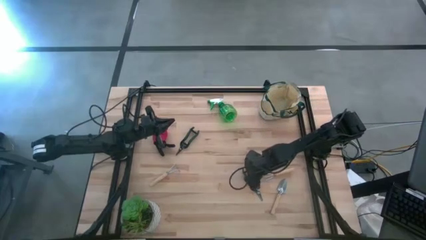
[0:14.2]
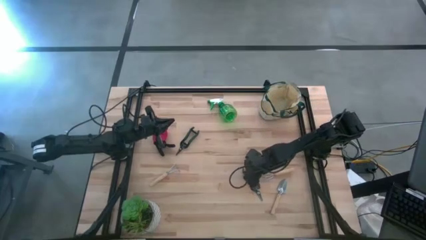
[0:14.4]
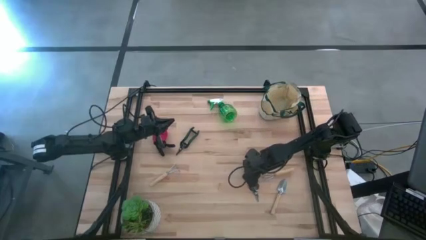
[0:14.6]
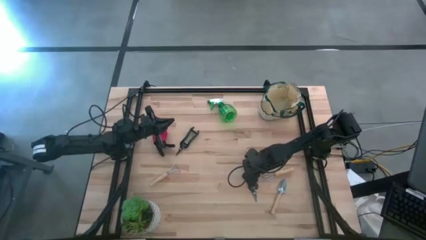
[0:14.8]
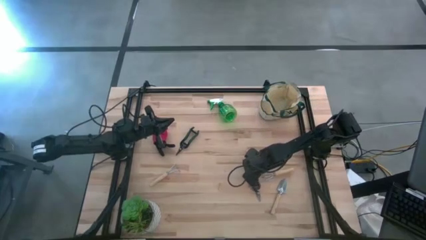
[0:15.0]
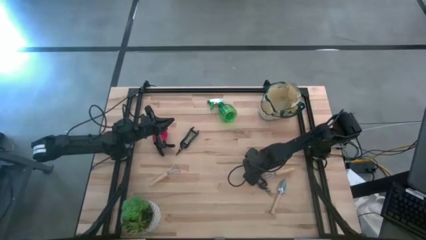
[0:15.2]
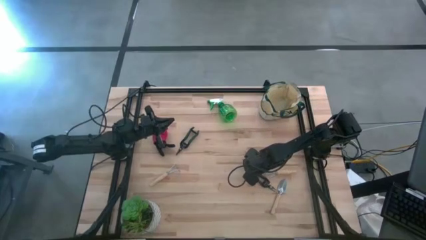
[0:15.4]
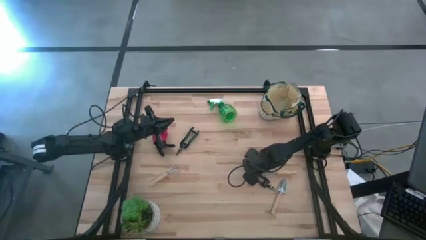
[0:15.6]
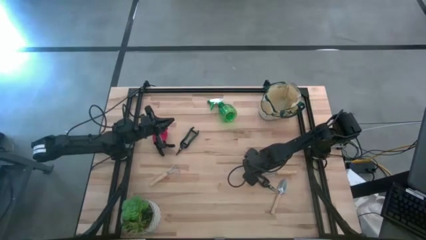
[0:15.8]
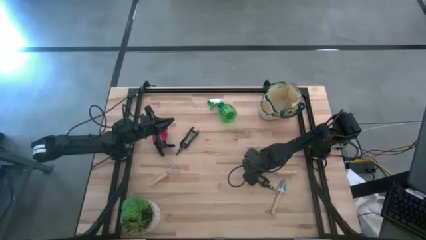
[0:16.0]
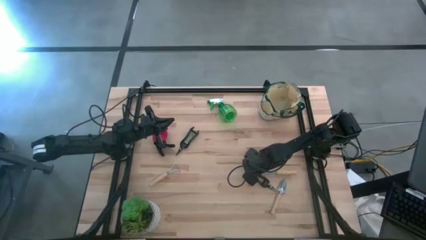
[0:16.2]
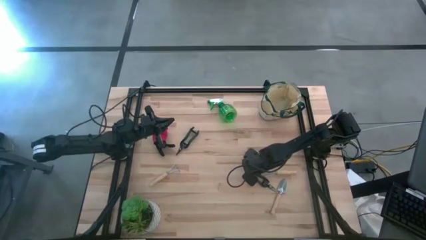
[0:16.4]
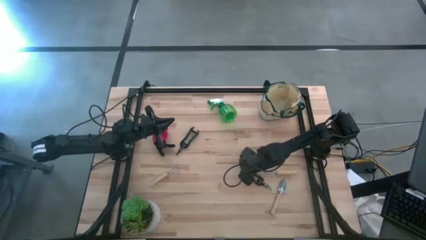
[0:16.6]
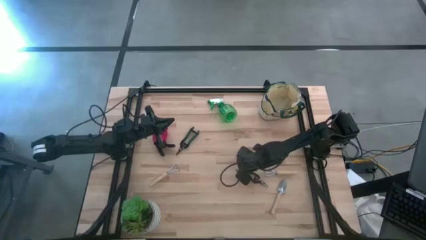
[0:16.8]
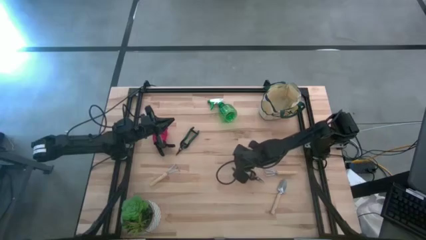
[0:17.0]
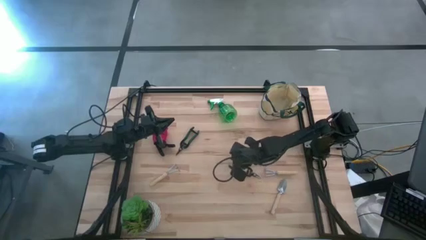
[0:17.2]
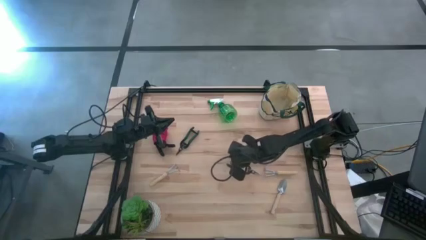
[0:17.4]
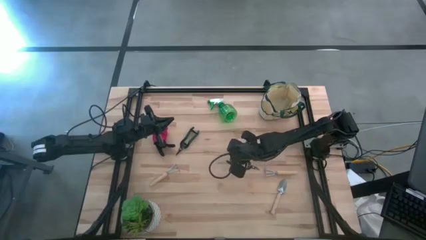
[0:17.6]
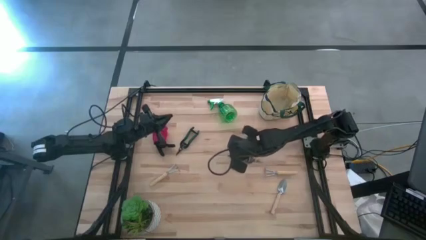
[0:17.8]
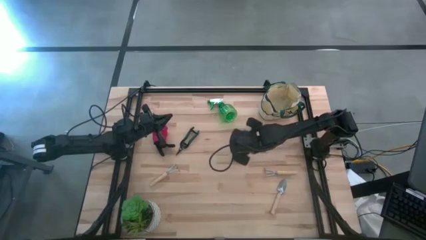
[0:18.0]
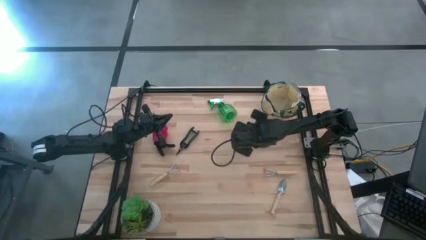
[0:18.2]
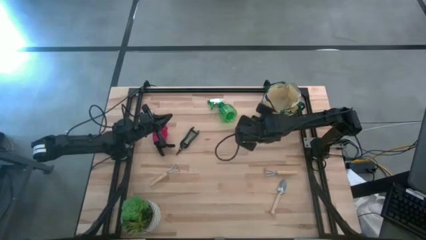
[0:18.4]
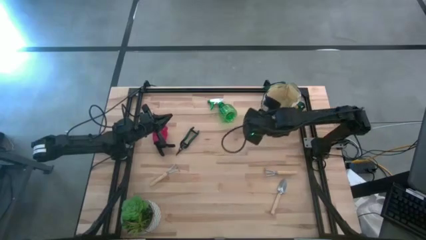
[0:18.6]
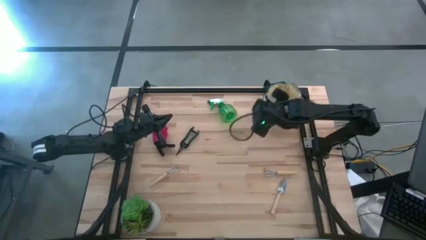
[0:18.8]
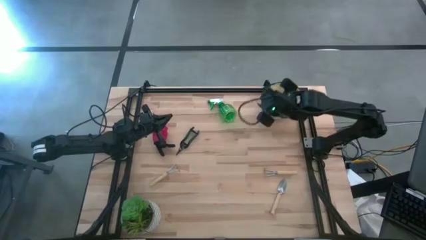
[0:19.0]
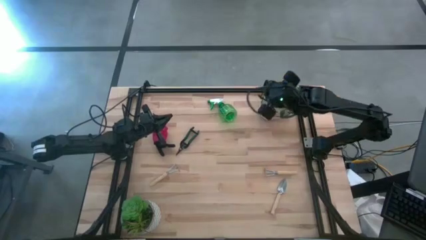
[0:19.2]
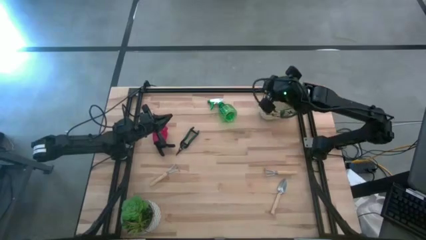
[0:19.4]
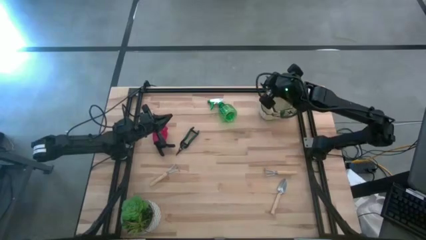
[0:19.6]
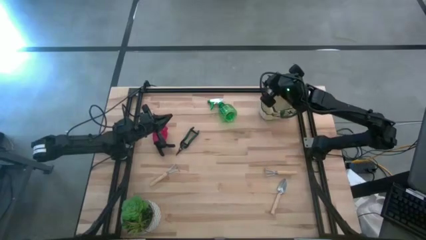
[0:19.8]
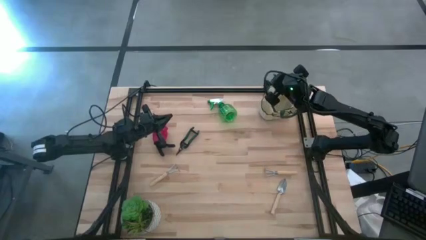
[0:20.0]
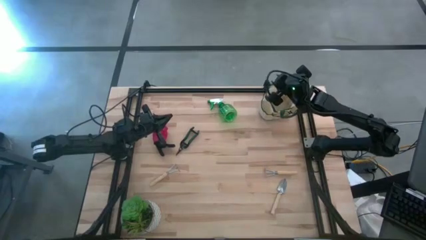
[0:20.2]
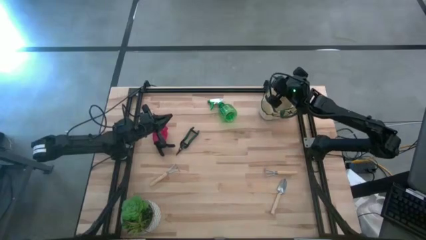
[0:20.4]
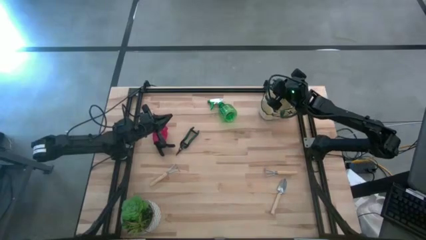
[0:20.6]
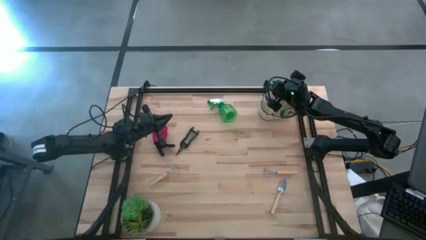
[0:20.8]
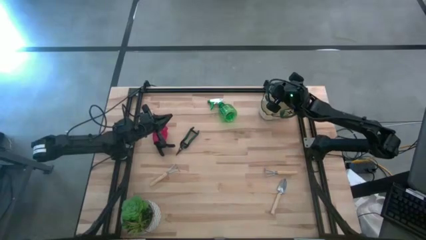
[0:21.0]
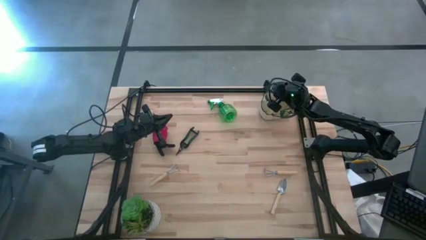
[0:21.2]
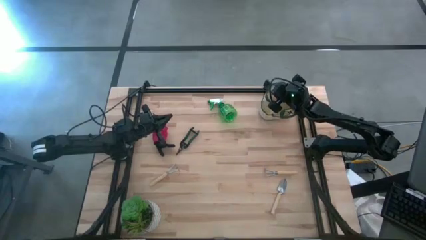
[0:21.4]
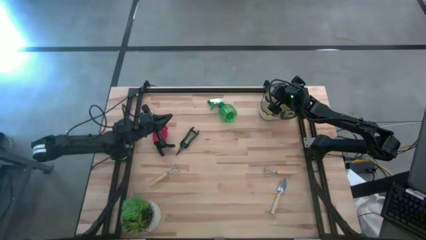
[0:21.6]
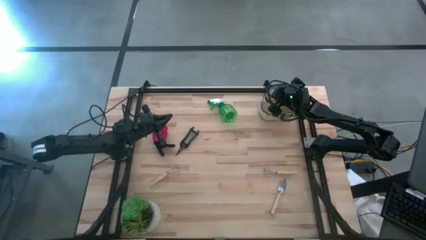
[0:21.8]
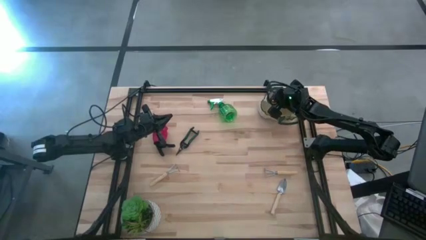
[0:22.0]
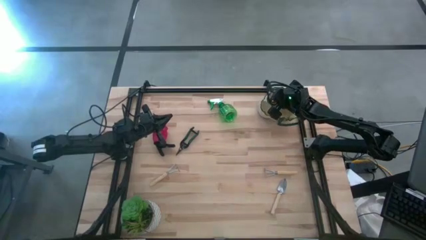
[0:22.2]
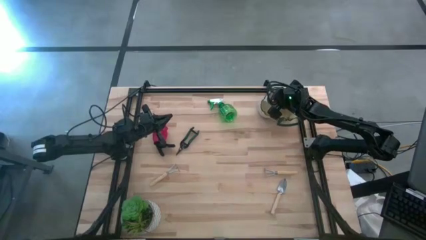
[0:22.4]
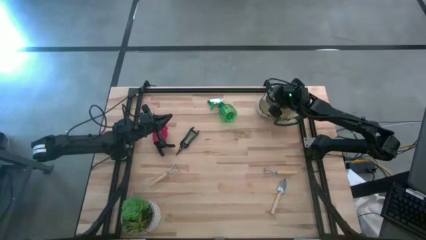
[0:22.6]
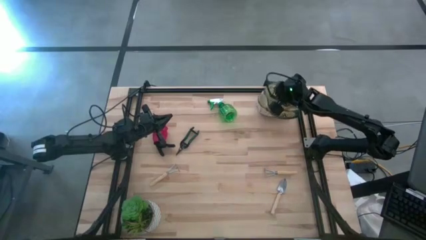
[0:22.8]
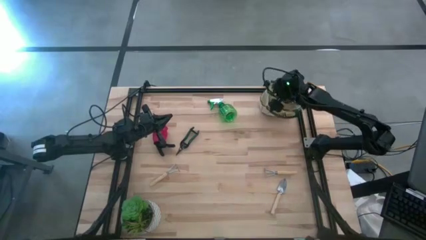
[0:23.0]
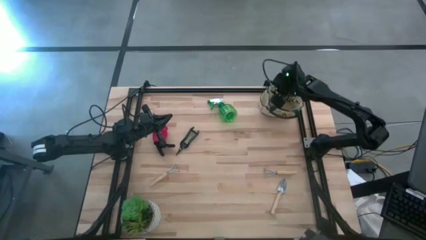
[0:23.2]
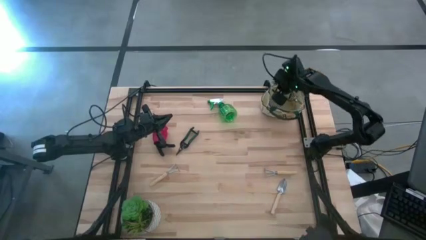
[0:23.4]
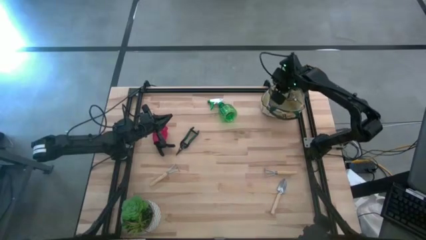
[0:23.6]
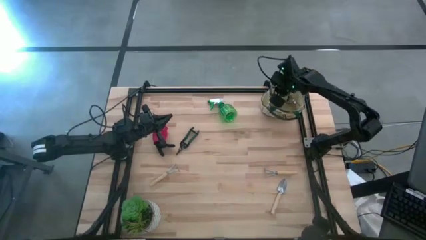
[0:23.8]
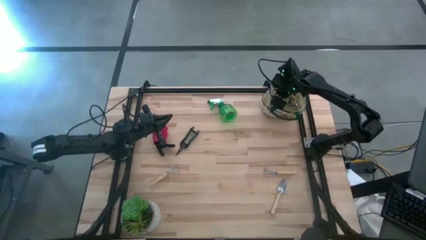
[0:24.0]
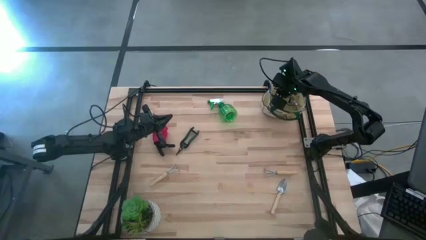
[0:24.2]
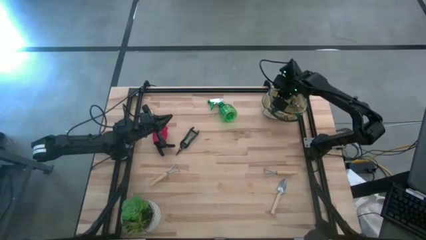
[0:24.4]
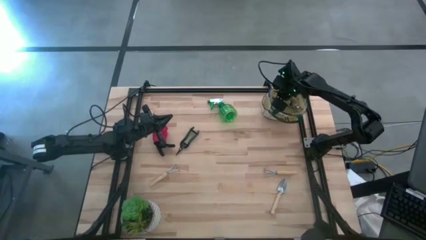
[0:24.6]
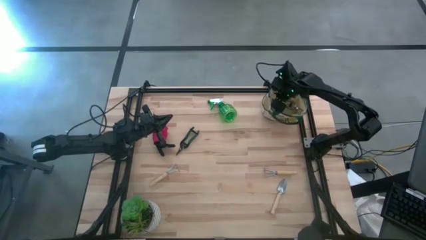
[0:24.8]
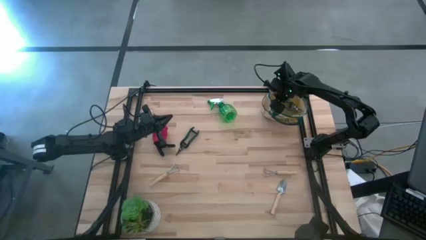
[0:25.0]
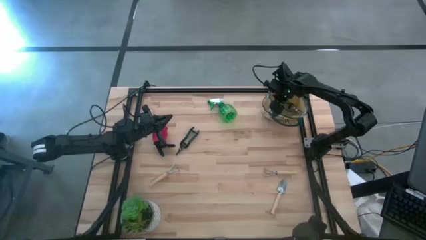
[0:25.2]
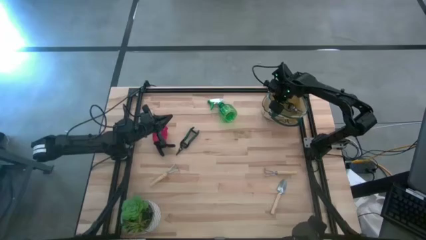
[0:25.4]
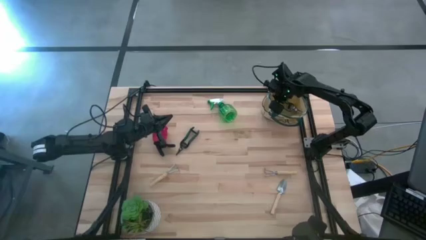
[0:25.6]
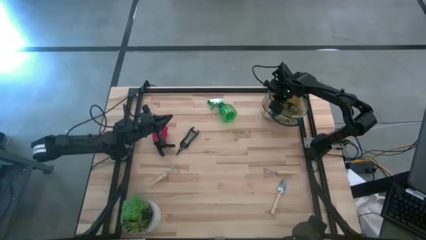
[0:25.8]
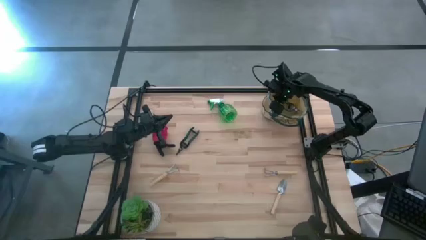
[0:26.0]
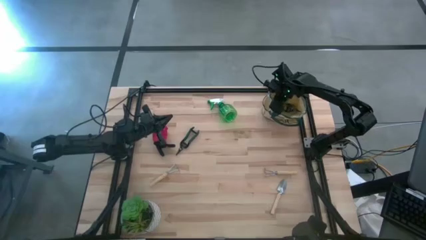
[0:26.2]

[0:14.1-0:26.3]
Task: Pick & Place Garden tools in Gardening bag
Put the right shear scissors into the gardening bag
